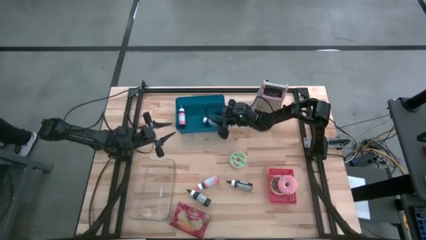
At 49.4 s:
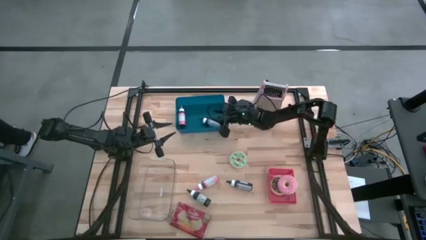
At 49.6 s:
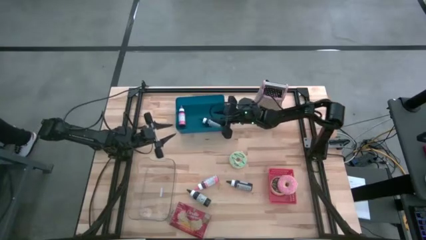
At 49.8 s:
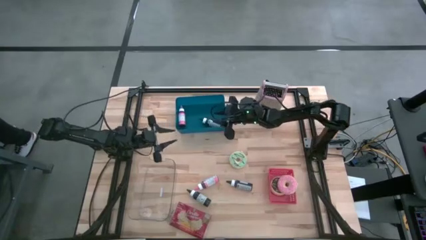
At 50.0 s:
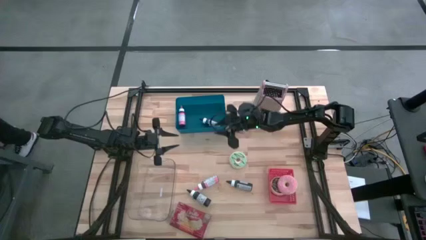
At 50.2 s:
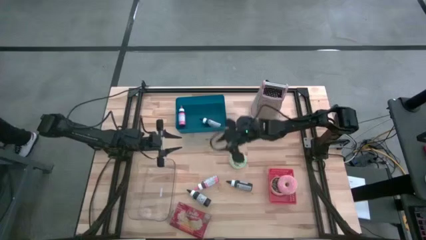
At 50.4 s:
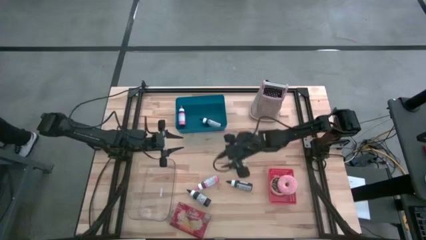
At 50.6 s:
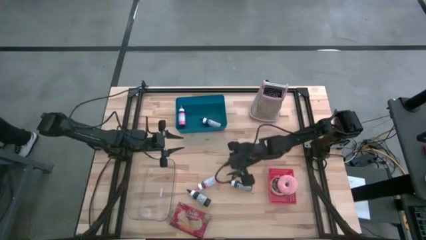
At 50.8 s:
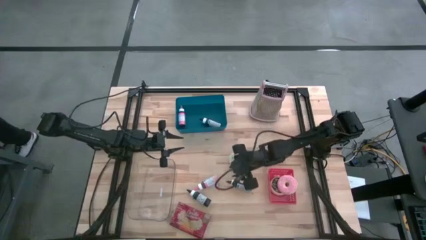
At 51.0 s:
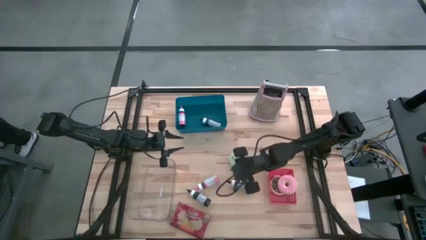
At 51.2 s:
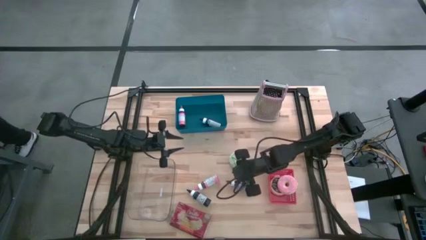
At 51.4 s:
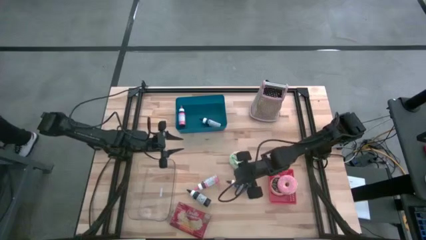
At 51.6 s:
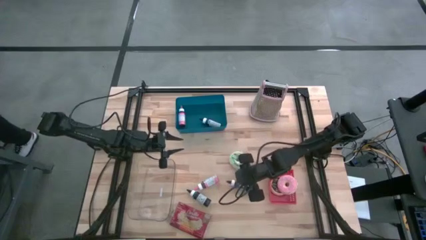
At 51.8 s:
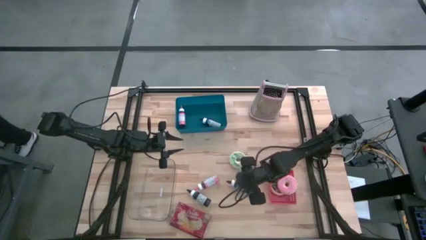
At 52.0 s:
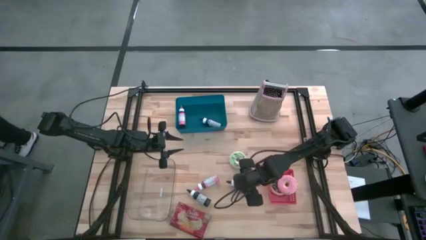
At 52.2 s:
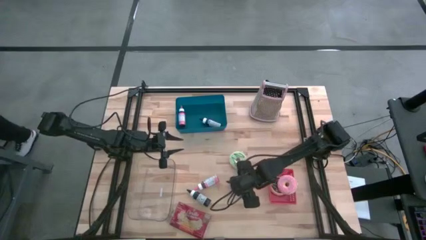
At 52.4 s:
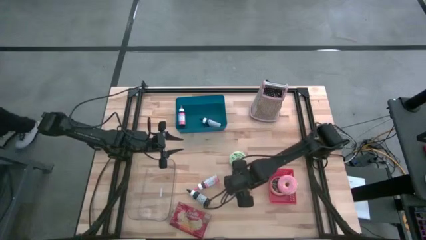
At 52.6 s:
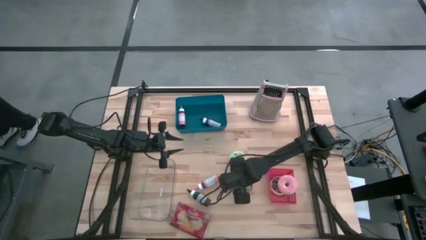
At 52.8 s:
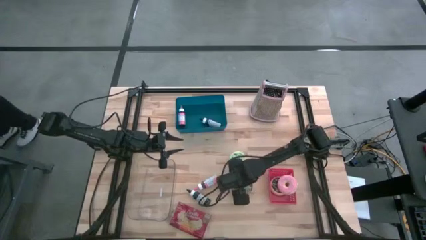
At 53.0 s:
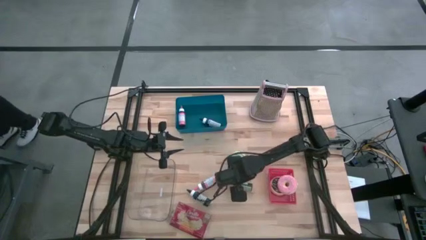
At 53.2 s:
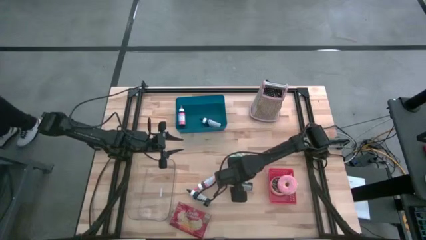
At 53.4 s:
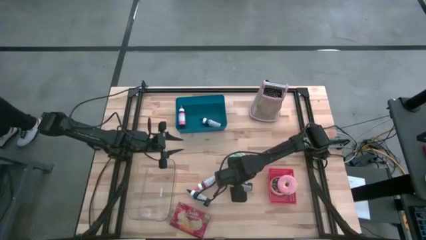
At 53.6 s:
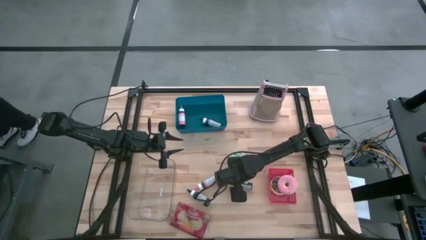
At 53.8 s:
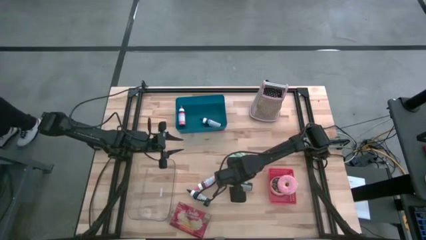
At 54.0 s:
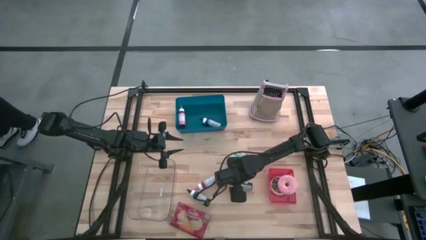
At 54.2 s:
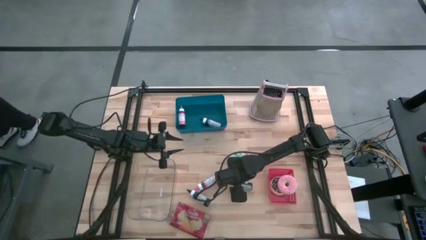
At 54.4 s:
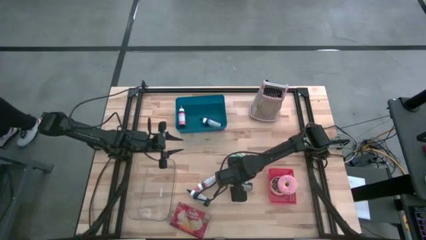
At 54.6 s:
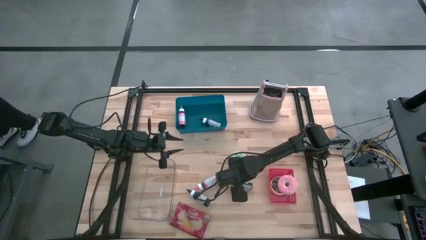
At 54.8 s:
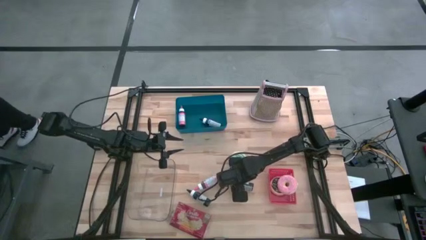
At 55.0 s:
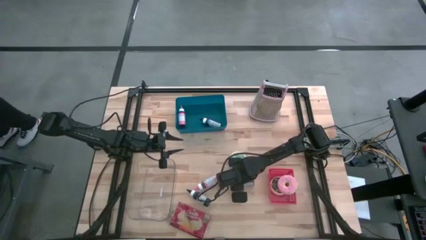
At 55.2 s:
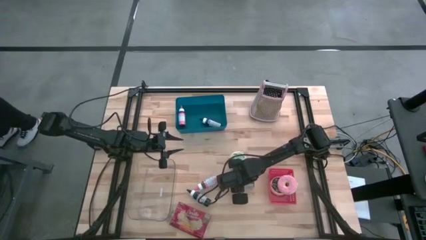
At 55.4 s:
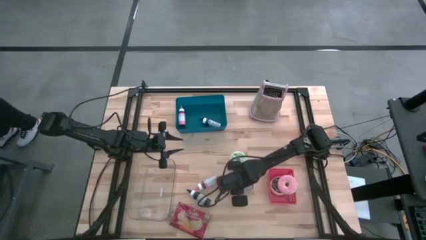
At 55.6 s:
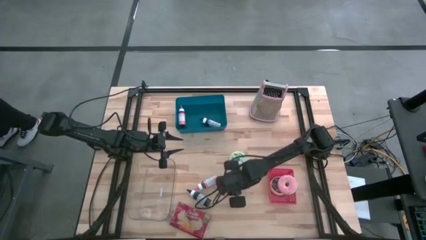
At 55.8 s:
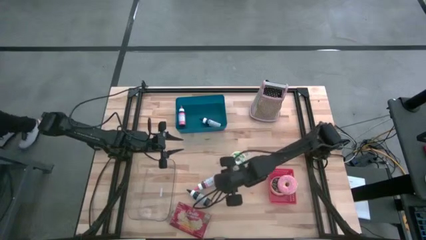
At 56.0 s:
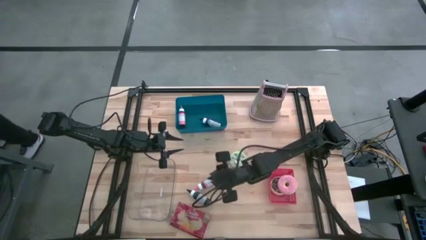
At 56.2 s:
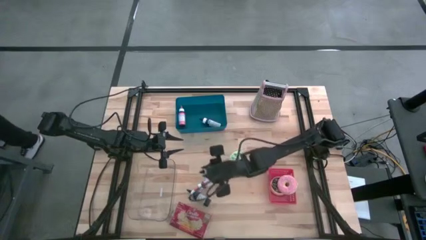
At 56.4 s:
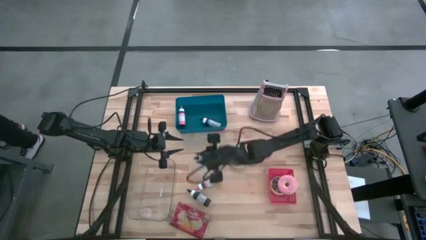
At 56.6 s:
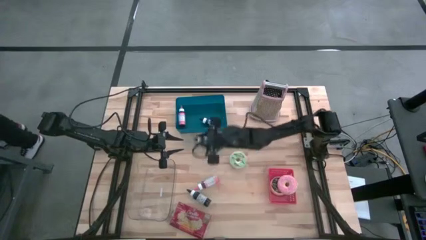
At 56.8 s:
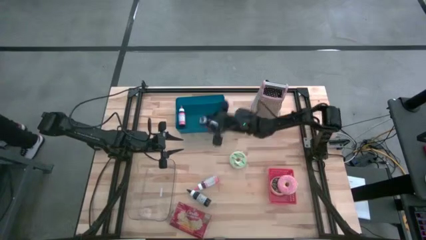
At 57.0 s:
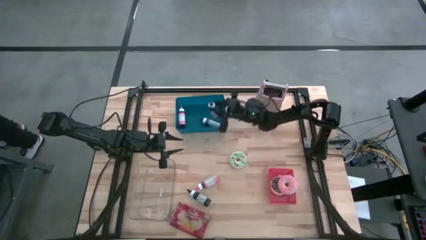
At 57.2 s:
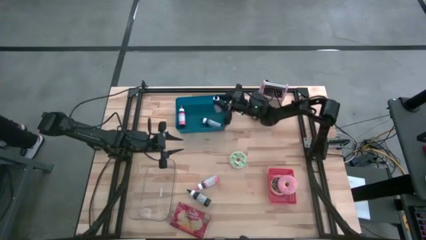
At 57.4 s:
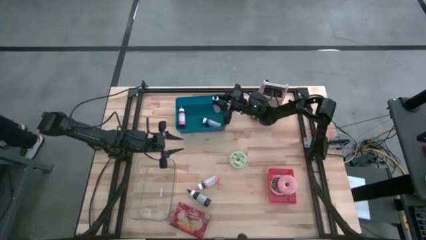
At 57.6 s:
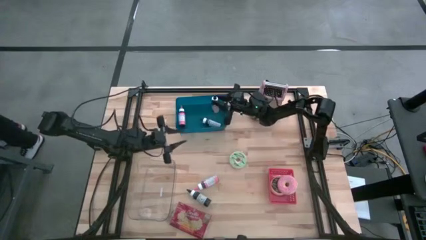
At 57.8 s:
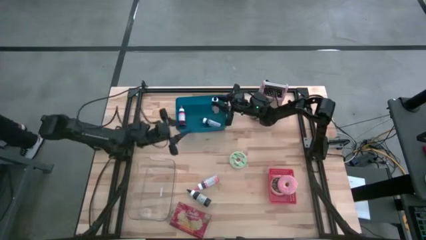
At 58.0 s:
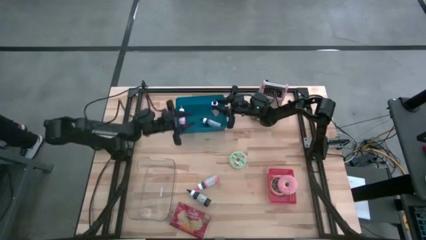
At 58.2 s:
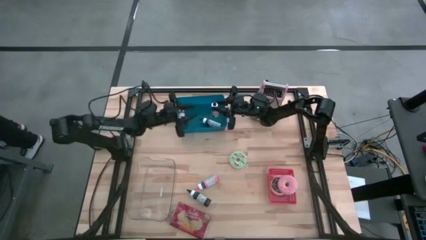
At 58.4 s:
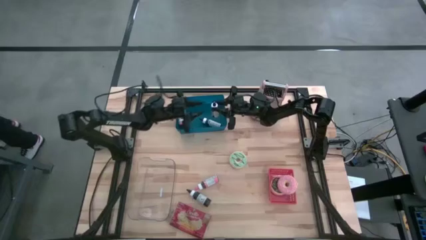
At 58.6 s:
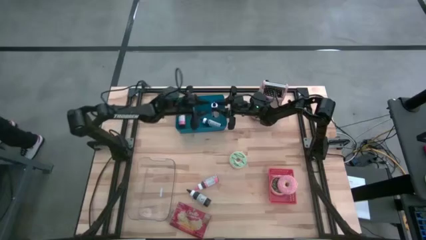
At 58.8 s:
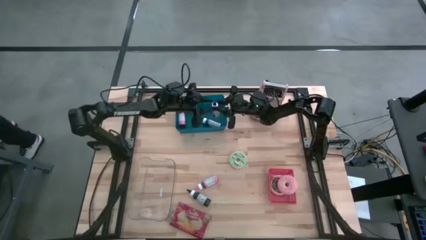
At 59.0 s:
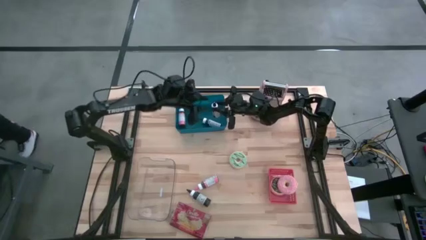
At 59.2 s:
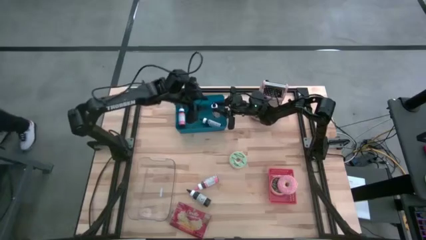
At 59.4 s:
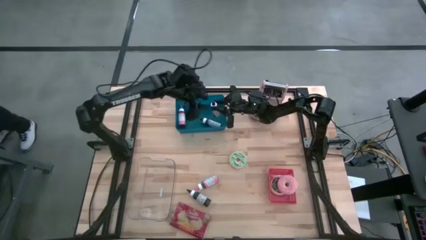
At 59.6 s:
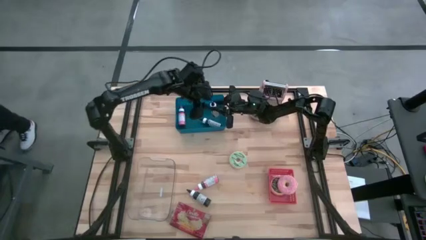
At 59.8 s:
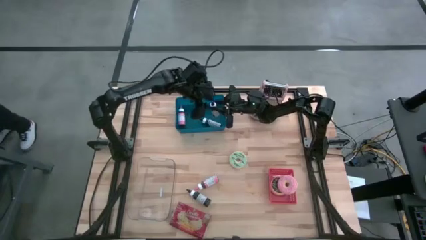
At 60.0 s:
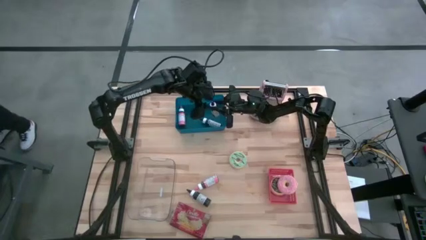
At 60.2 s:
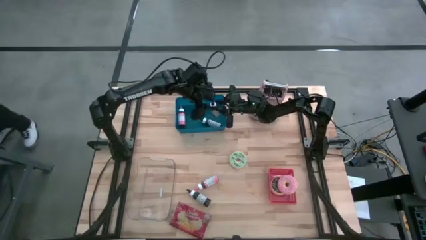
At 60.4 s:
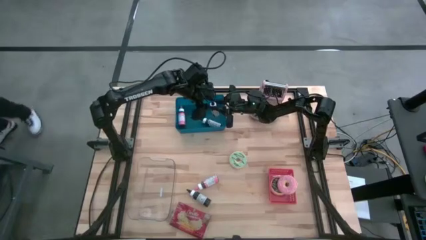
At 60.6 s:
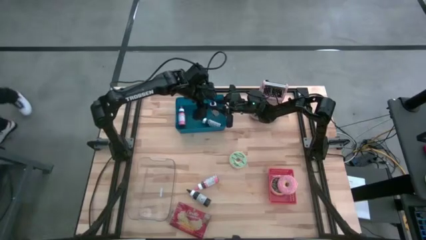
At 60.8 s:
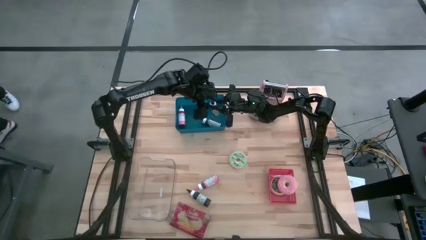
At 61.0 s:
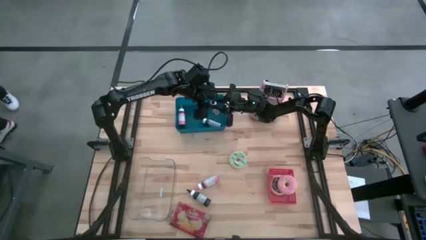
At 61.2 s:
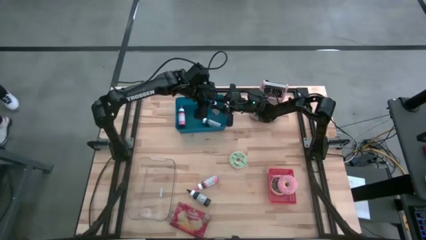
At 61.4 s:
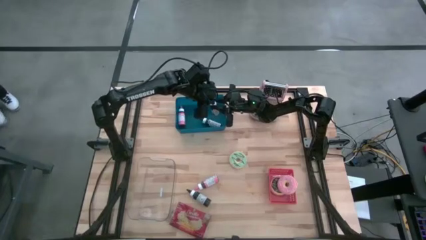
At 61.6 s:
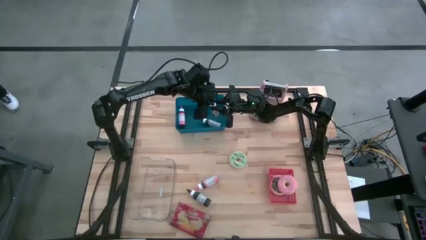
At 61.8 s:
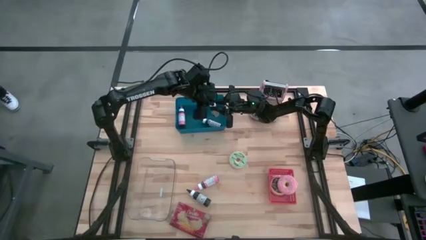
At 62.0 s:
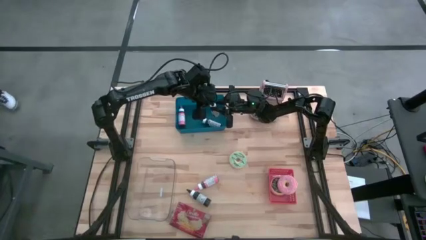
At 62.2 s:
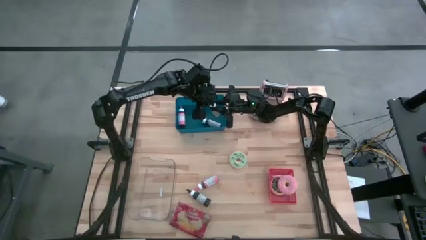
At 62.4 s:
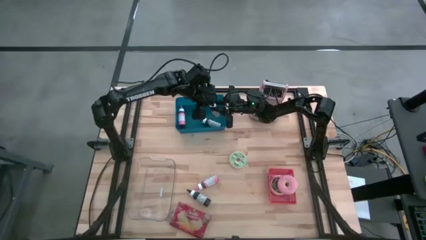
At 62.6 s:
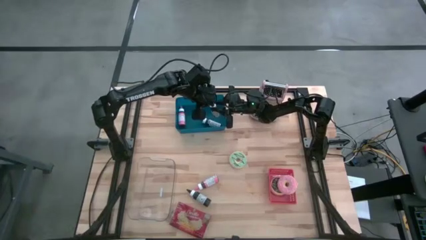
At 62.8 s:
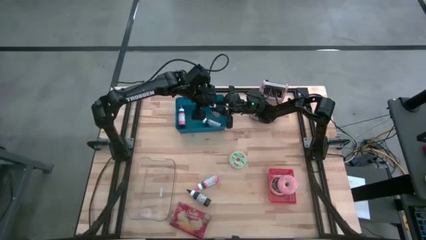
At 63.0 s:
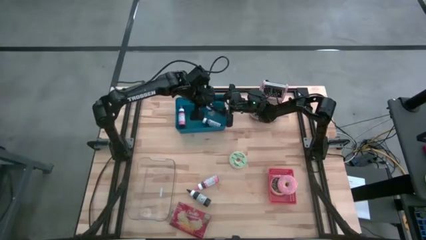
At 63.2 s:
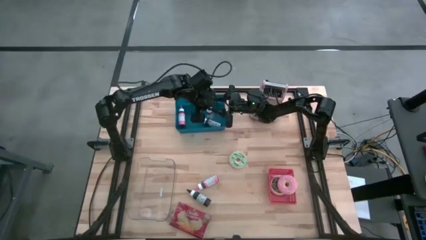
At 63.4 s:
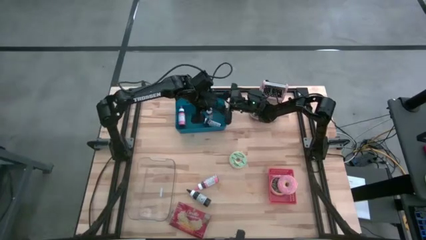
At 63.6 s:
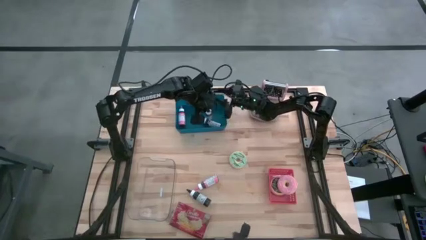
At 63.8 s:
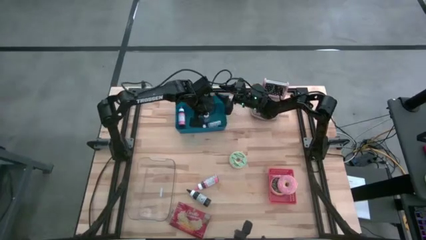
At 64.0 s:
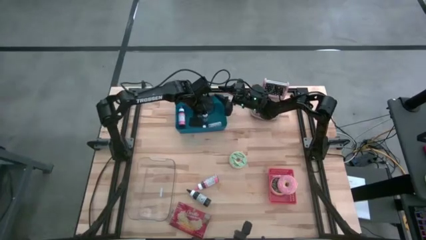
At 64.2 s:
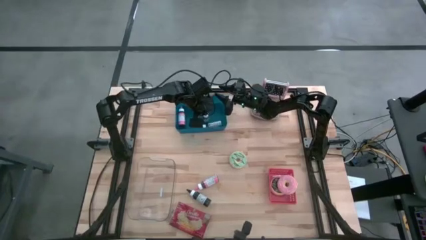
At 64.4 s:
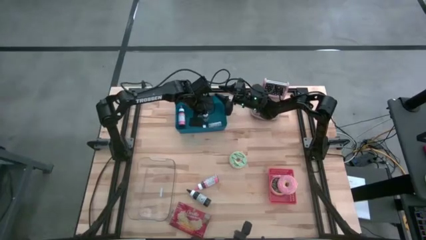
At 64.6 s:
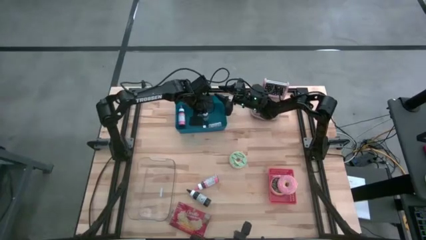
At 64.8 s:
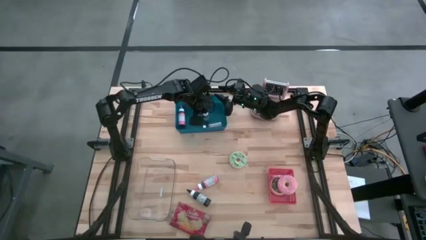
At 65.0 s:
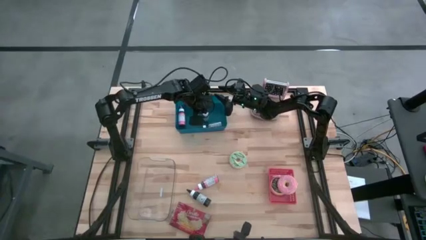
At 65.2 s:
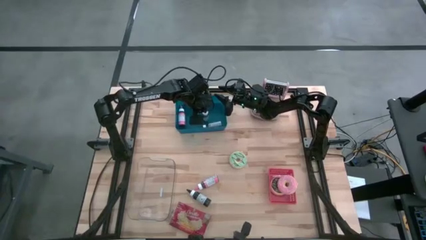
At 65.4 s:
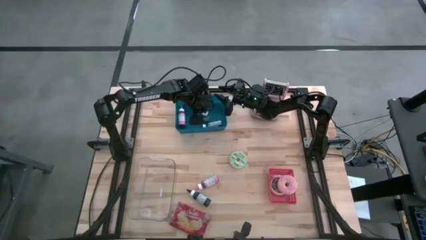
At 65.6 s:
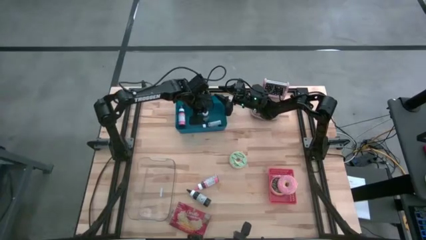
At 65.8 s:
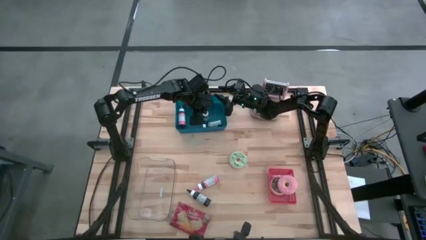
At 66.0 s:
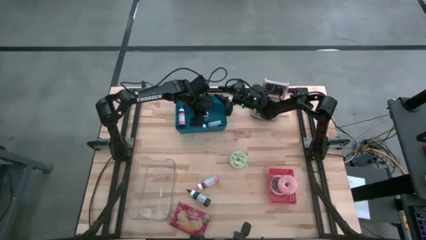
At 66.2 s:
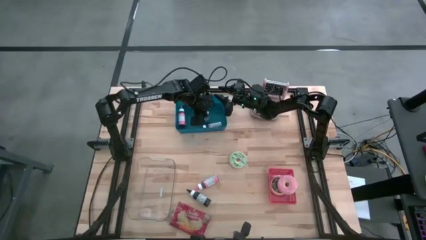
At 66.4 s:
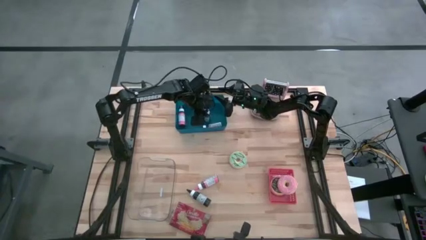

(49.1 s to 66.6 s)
Task: Pick & Place Food Item
Put the right black food coloring bottle into the blue bin
